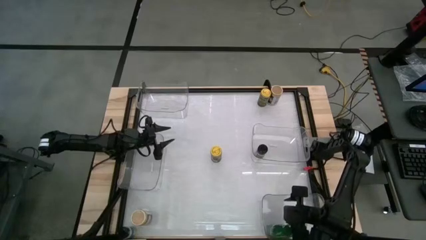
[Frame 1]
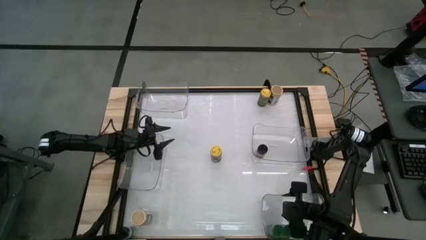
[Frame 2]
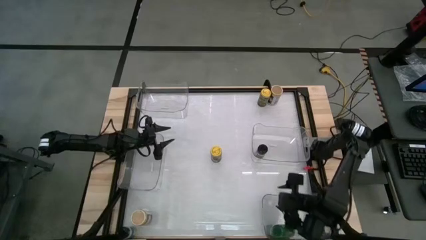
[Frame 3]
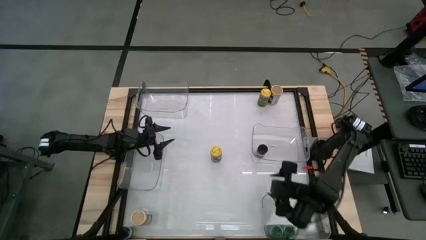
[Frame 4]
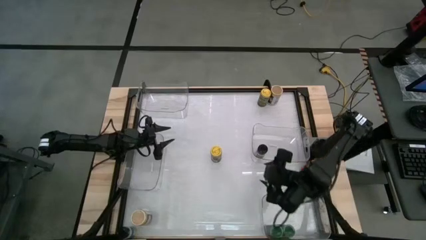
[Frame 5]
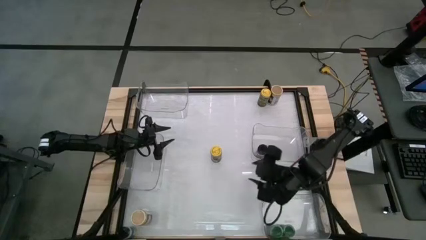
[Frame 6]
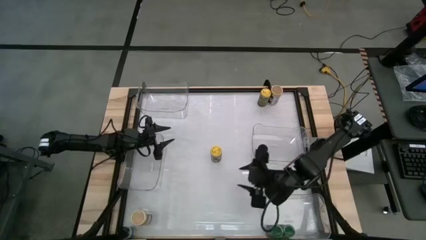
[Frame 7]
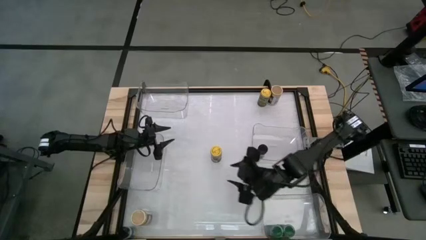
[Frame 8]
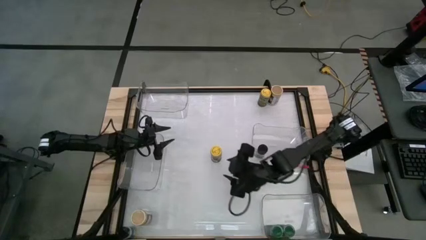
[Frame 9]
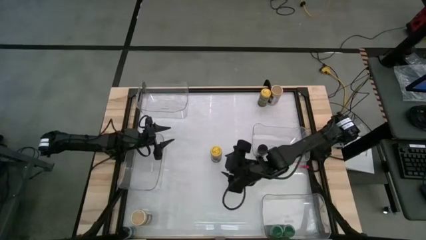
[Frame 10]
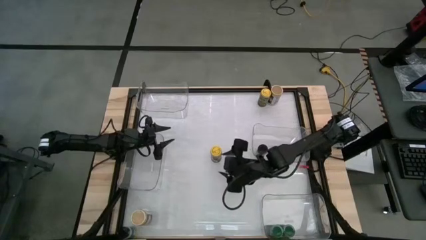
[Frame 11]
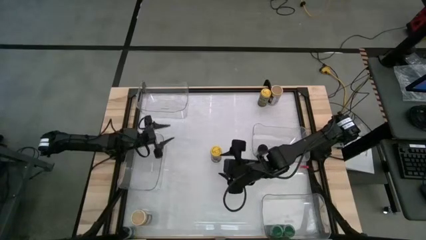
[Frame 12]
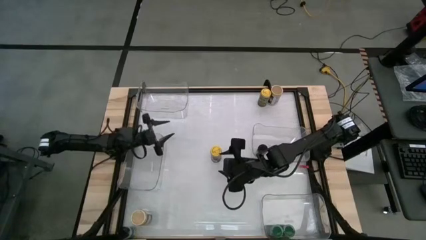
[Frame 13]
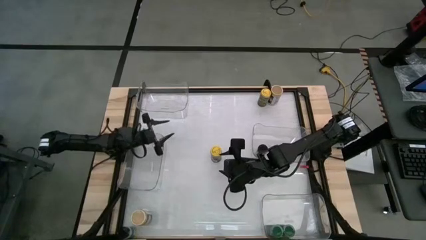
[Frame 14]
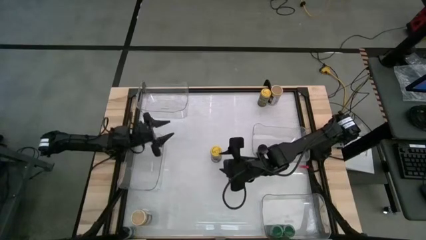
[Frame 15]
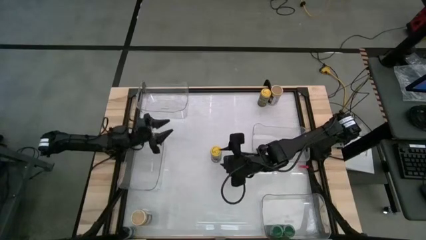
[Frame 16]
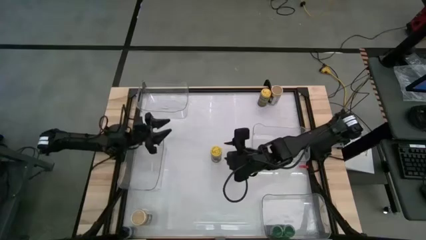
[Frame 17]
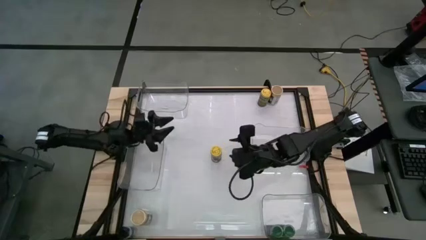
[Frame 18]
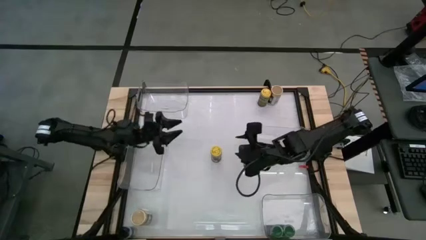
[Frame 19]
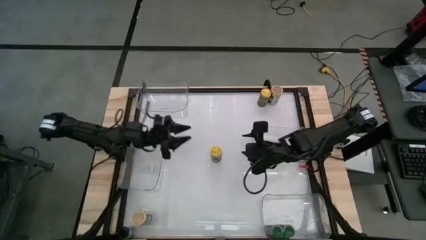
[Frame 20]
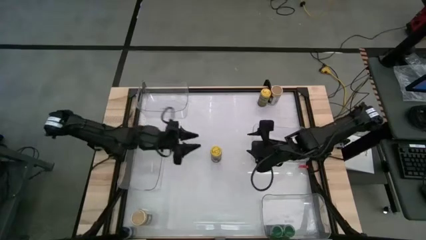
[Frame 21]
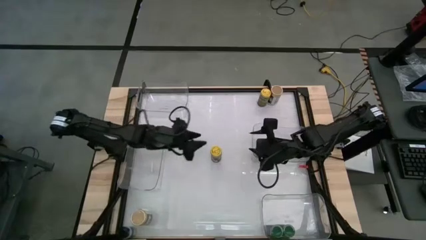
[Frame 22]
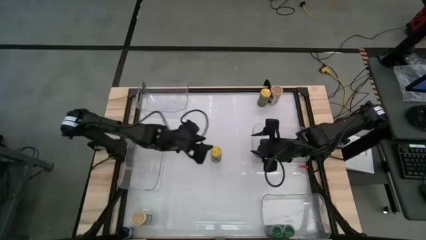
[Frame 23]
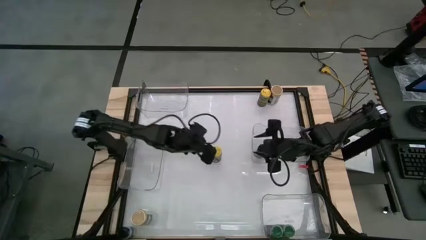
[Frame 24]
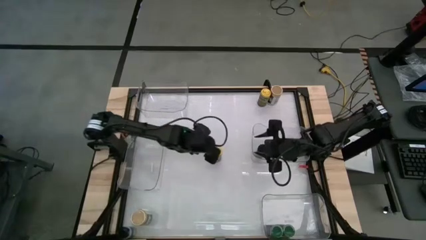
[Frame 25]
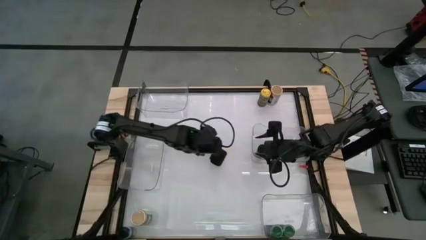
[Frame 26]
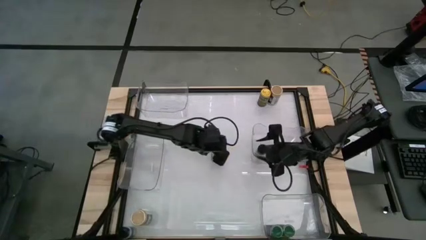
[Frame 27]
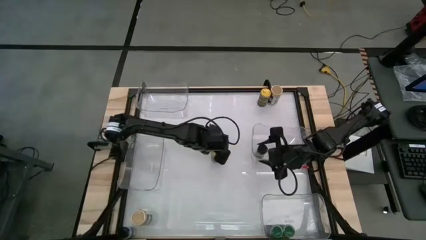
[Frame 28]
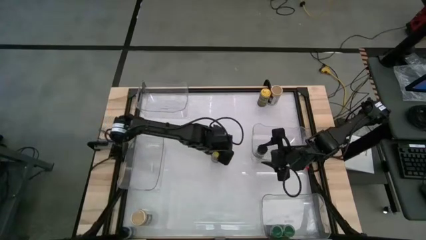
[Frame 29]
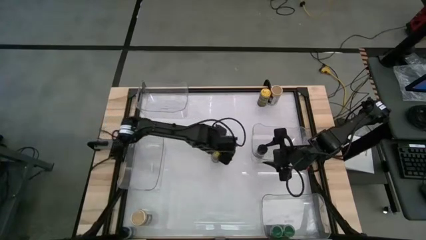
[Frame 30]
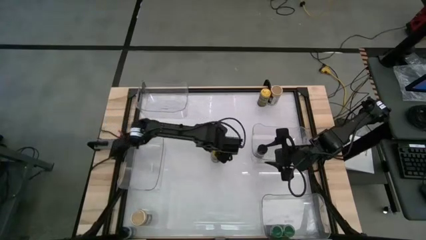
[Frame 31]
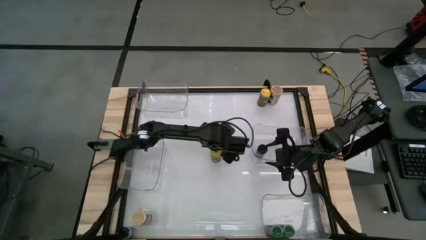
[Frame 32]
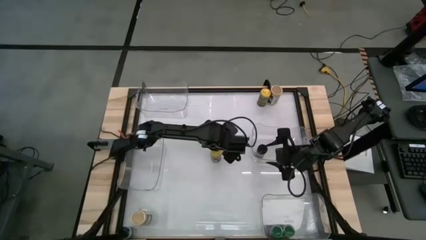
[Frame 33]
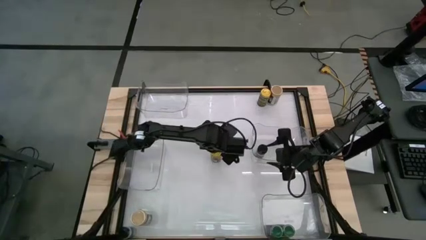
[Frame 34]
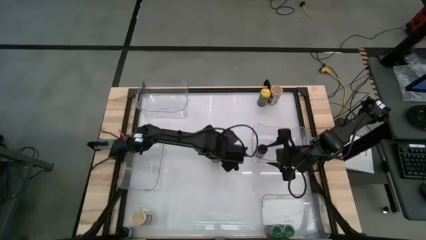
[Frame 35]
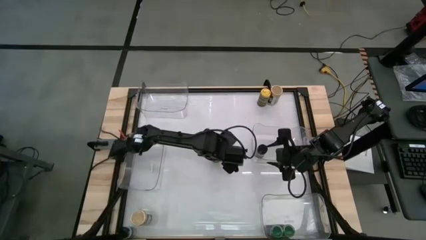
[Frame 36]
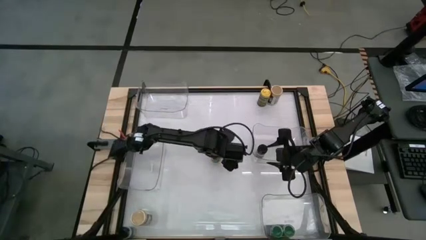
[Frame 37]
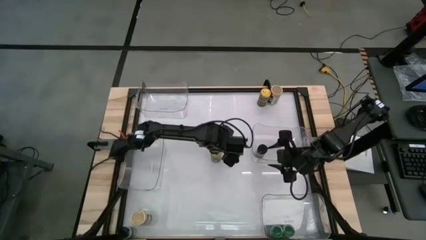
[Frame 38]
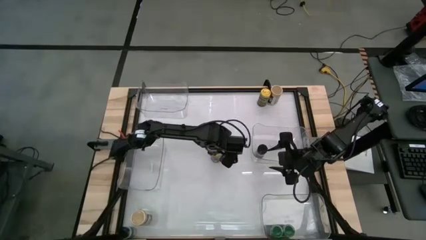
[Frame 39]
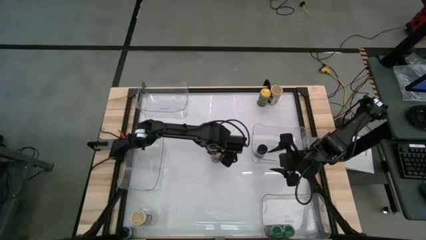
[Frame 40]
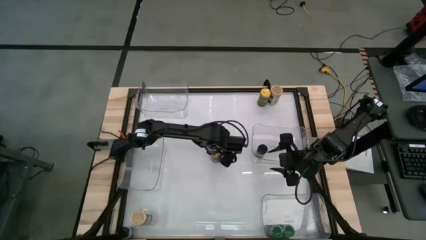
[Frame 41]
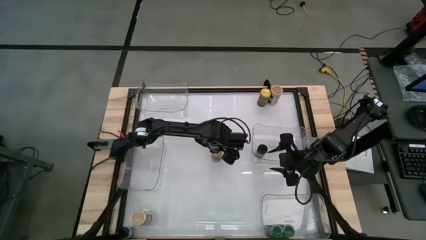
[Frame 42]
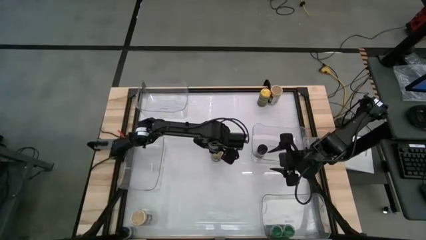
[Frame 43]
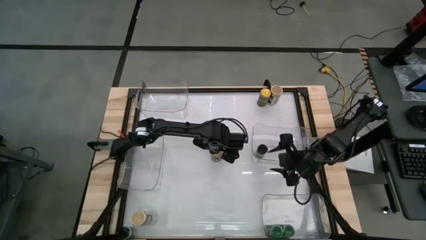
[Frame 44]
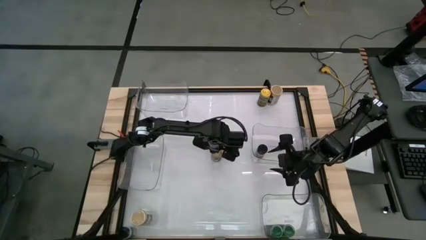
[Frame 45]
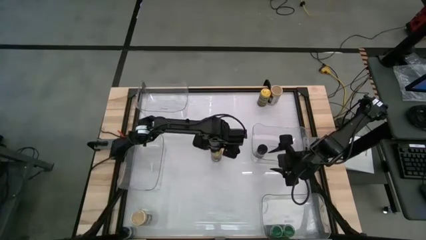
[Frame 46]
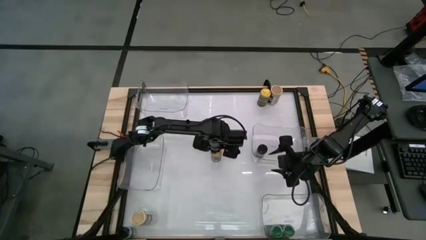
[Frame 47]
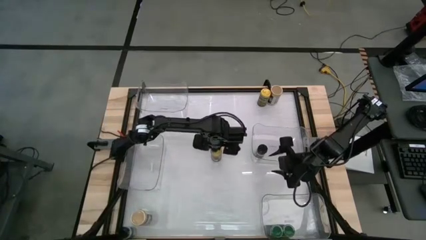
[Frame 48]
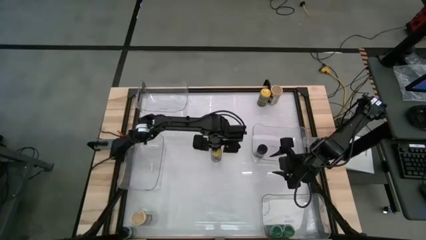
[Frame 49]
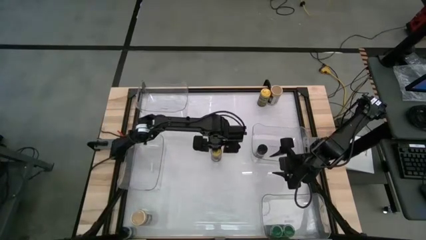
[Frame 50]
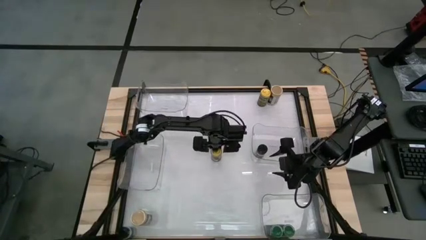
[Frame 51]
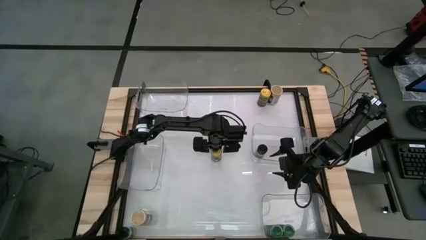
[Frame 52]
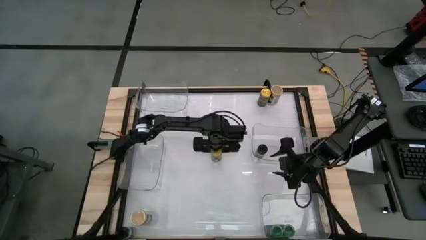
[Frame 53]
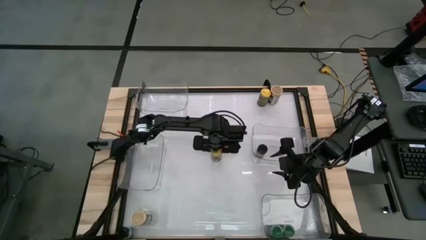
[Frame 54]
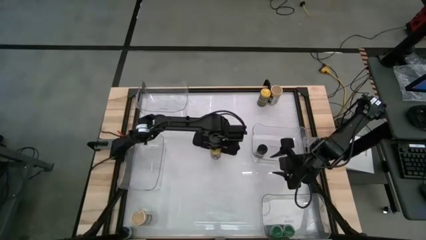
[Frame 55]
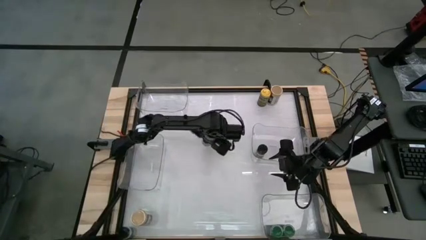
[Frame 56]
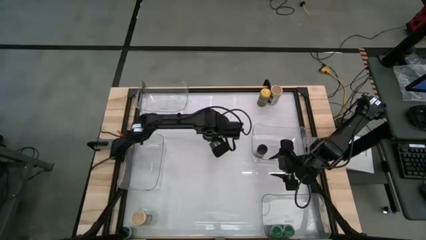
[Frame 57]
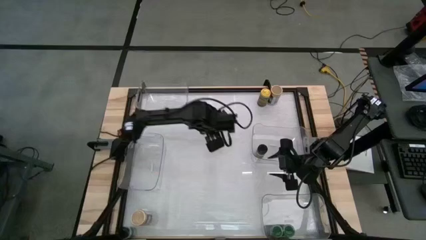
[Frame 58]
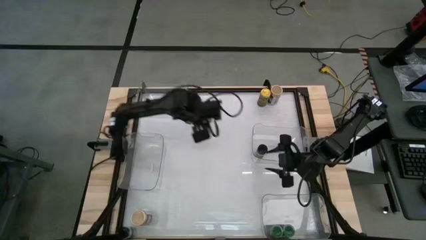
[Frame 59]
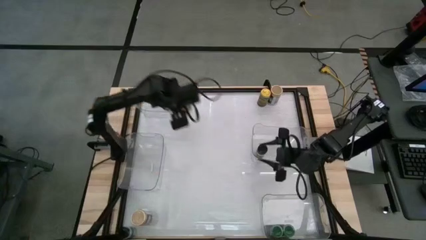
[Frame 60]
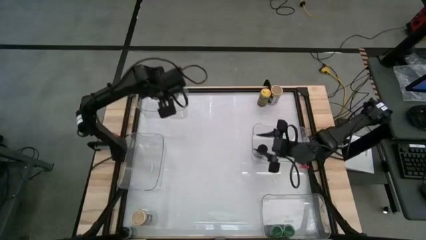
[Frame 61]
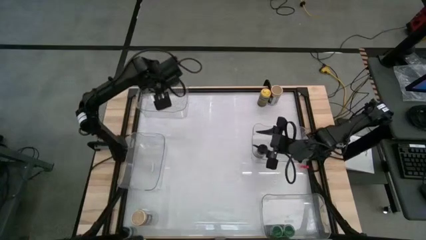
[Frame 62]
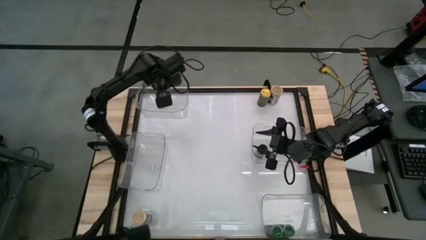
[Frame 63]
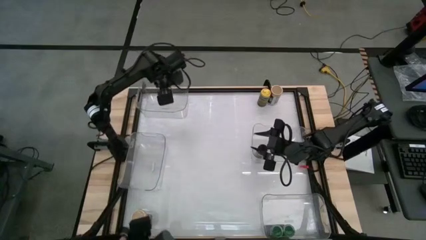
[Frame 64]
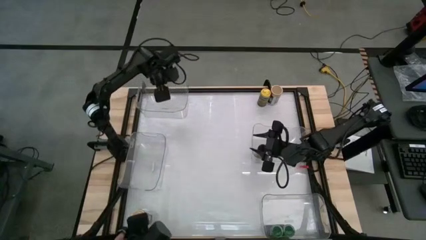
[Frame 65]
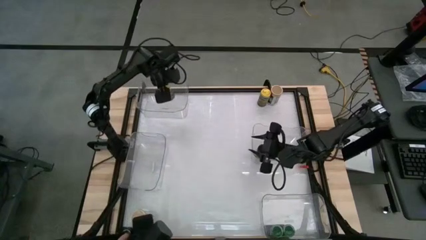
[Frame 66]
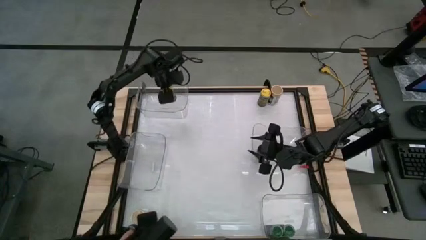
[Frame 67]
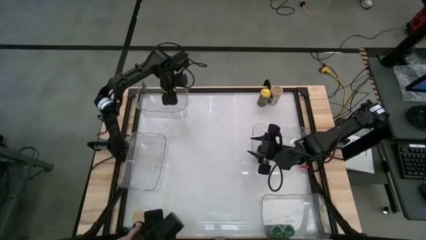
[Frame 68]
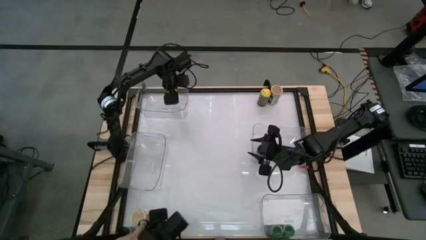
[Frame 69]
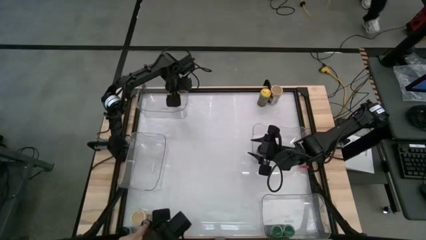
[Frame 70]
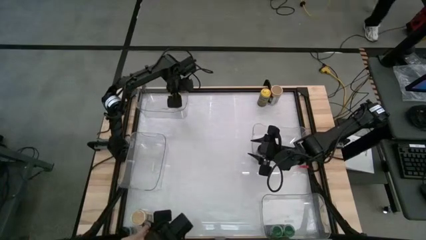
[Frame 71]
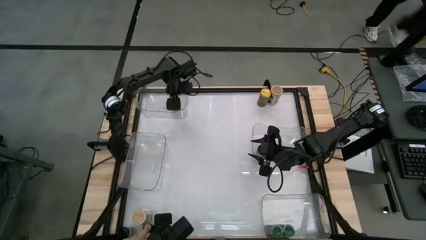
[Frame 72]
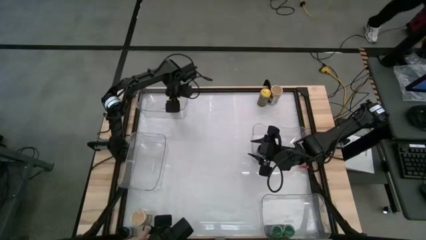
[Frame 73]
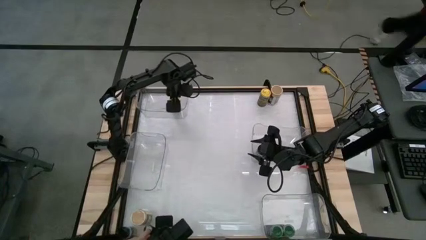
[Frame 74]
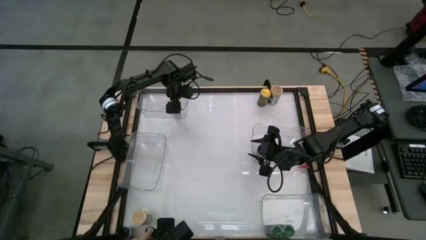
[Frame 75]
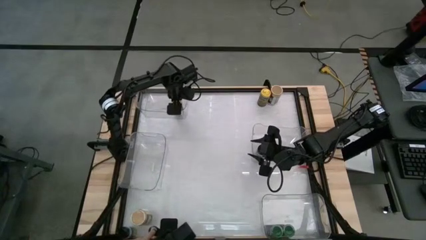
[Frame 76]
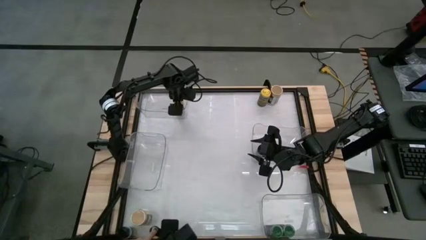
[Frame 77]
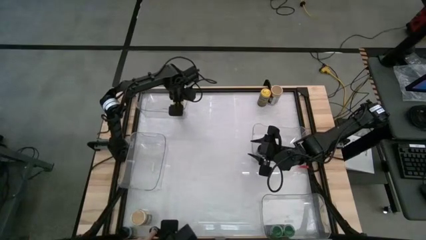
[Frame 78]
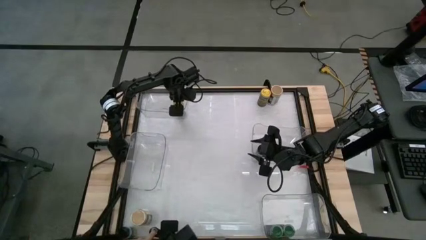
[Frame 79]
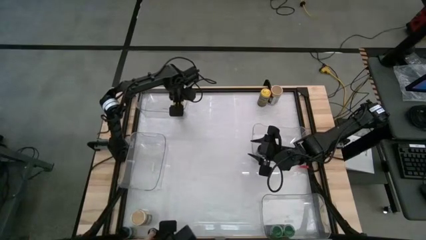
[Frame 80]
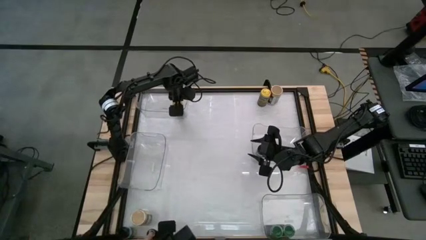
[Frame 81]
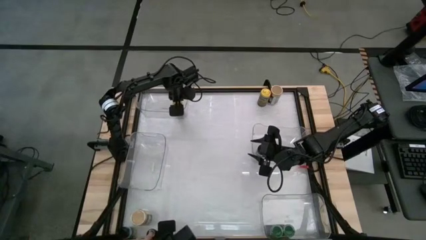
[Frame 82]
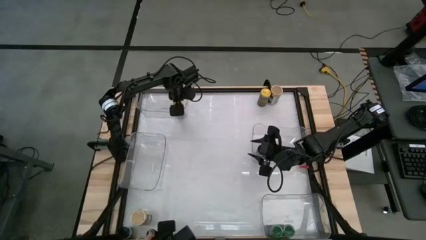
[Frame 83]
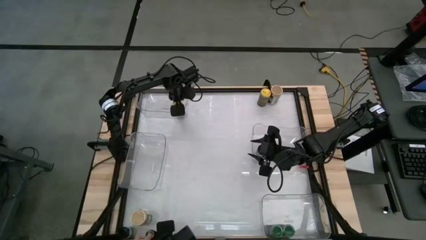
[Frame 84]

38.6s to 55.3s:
Task: Sort spices by type
Put the bottom yellow seasoning bottle into the top transparent bin
